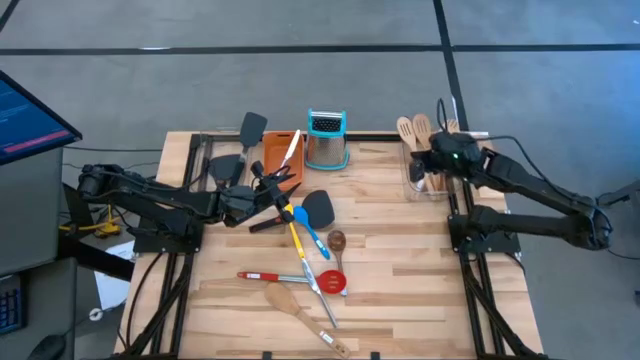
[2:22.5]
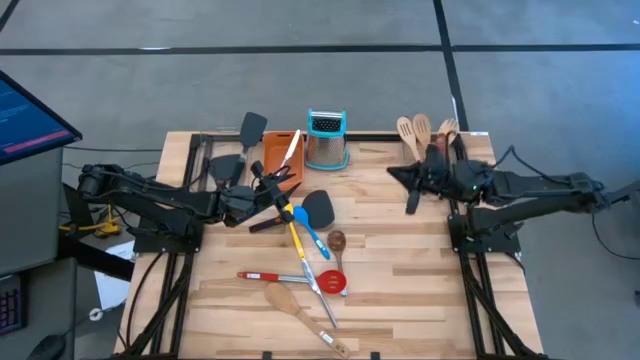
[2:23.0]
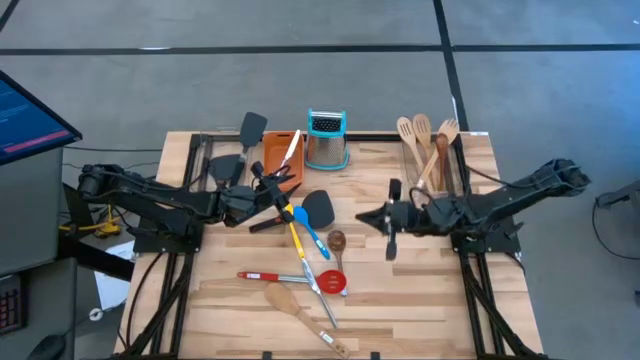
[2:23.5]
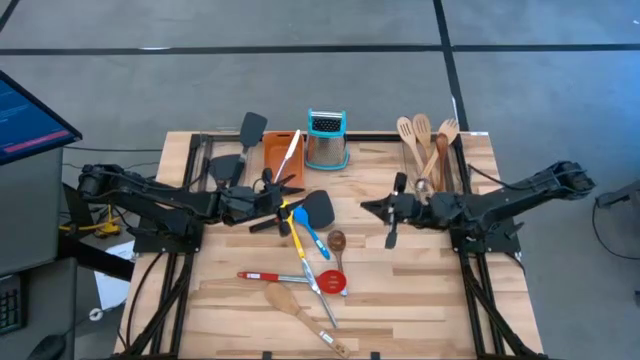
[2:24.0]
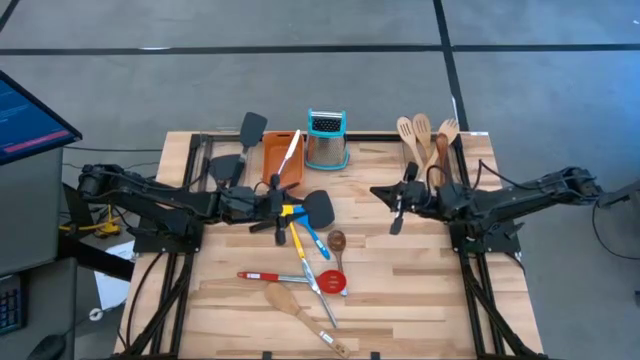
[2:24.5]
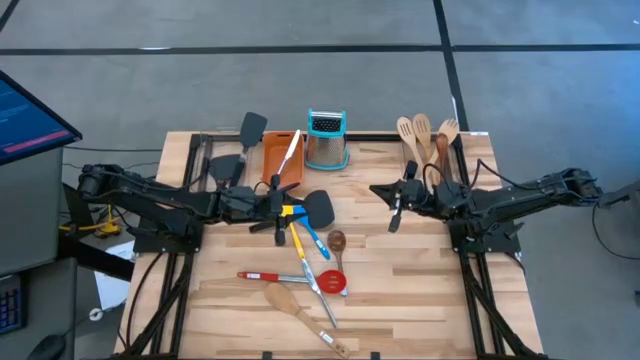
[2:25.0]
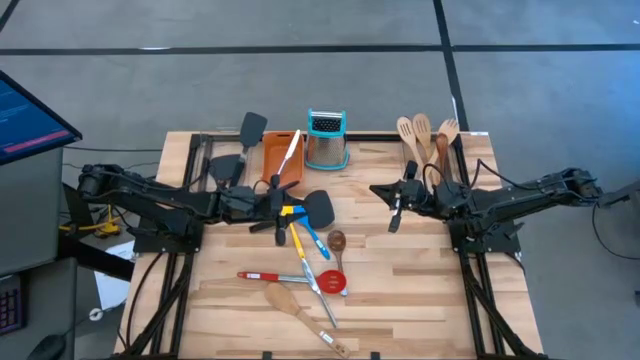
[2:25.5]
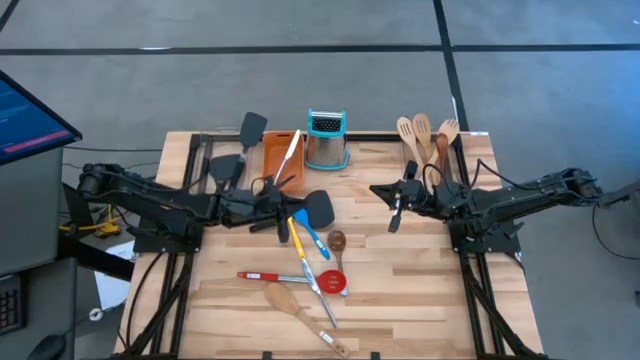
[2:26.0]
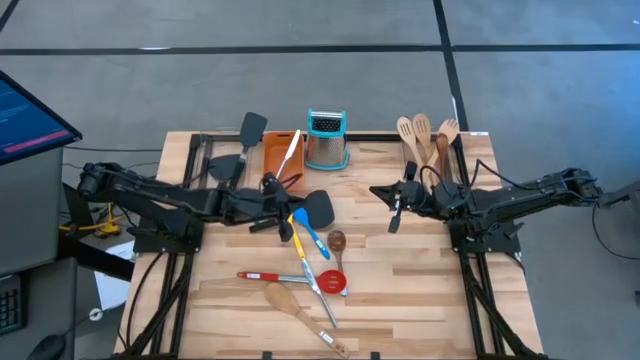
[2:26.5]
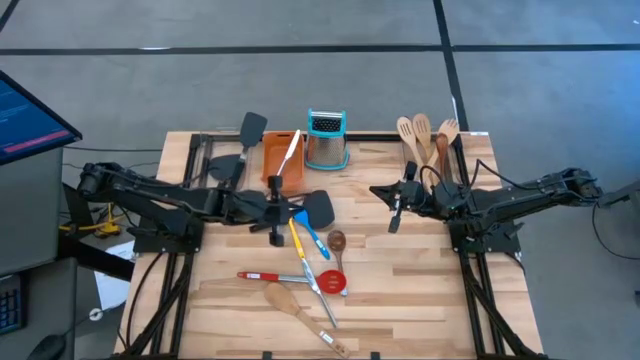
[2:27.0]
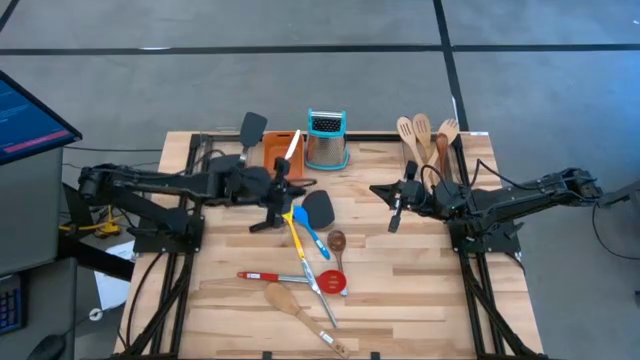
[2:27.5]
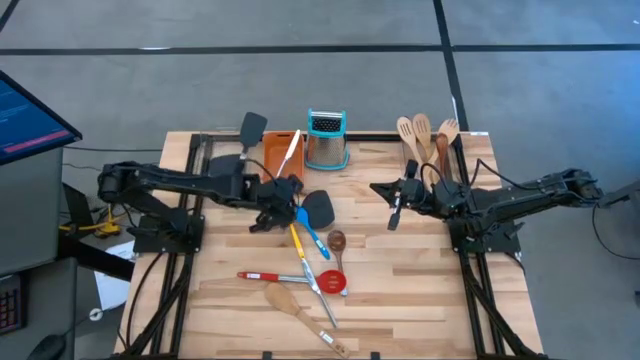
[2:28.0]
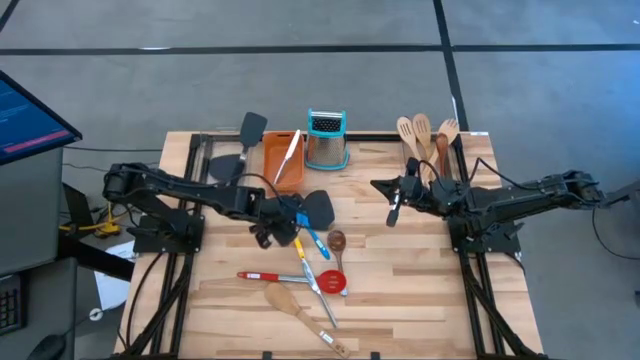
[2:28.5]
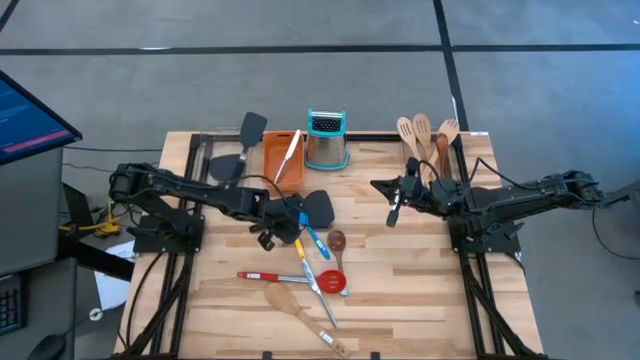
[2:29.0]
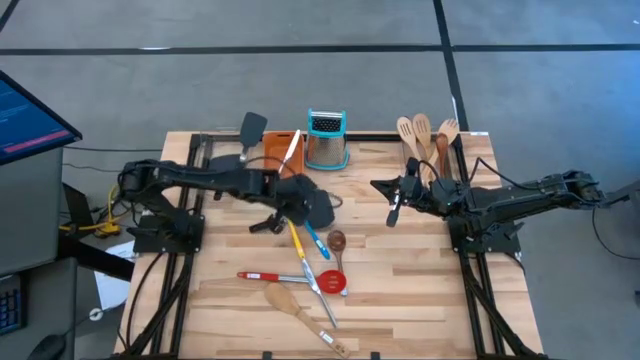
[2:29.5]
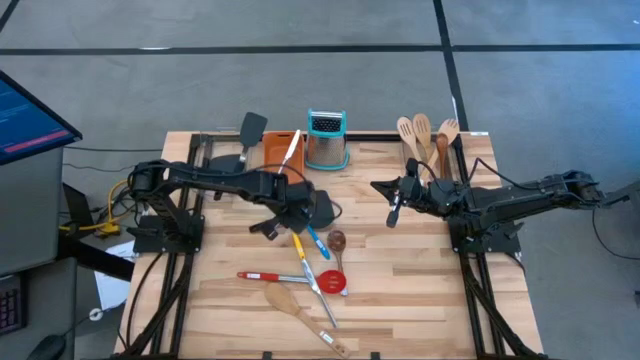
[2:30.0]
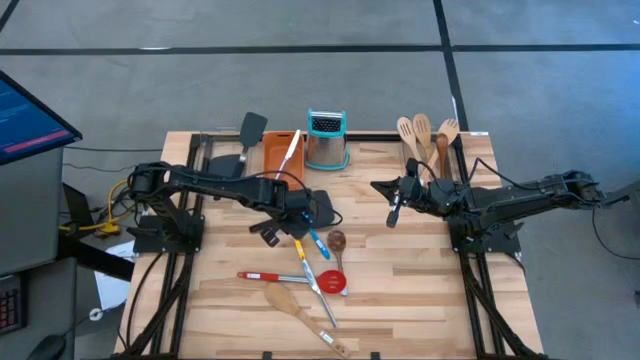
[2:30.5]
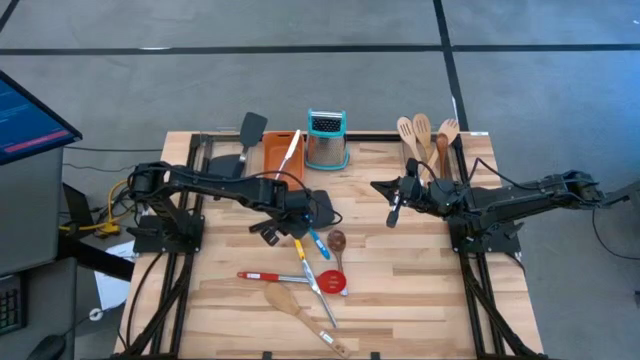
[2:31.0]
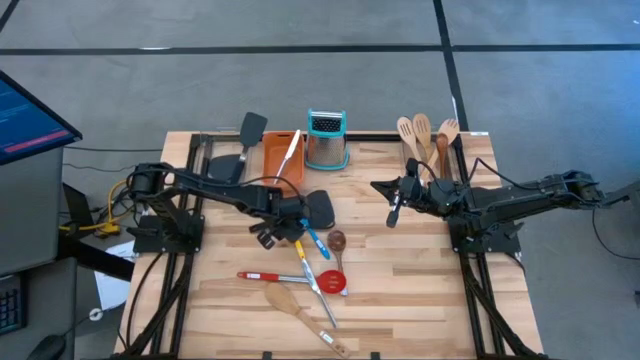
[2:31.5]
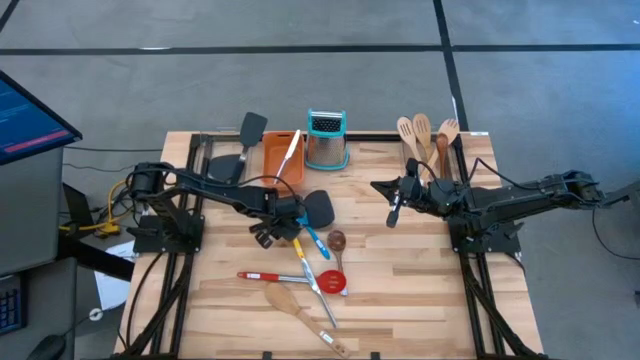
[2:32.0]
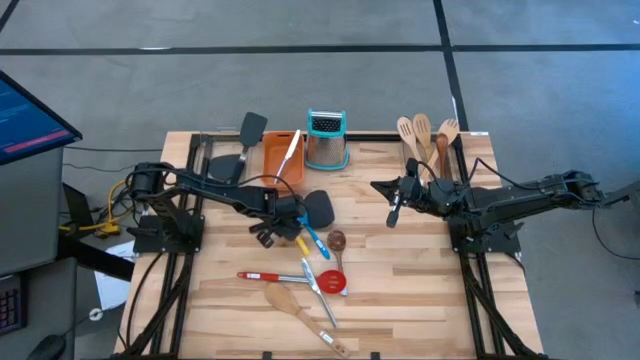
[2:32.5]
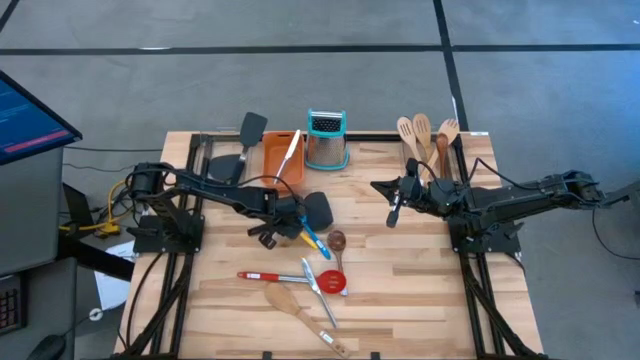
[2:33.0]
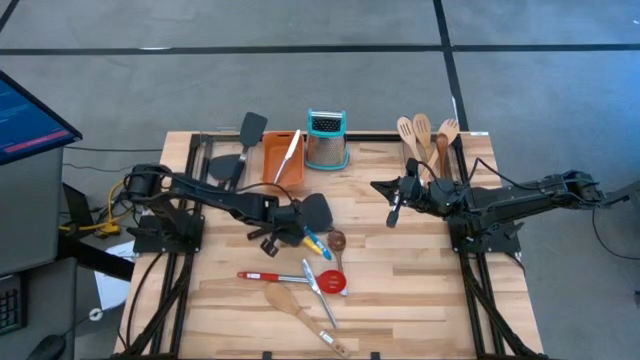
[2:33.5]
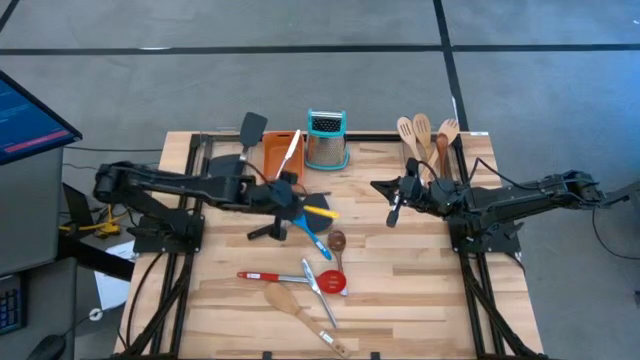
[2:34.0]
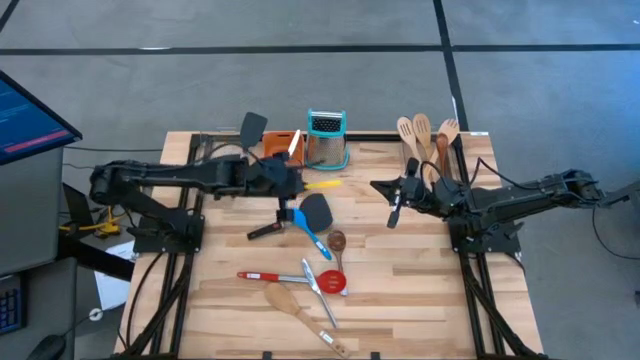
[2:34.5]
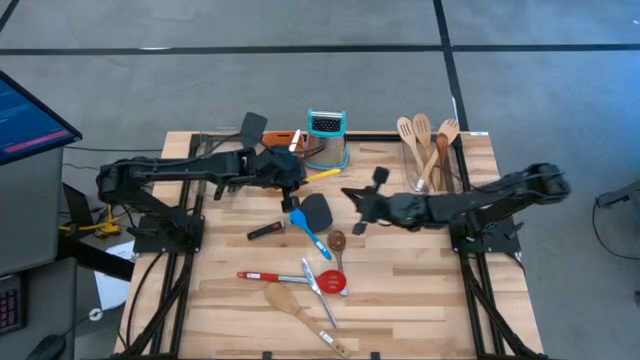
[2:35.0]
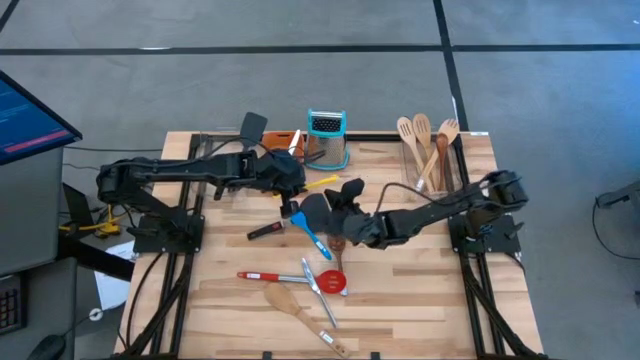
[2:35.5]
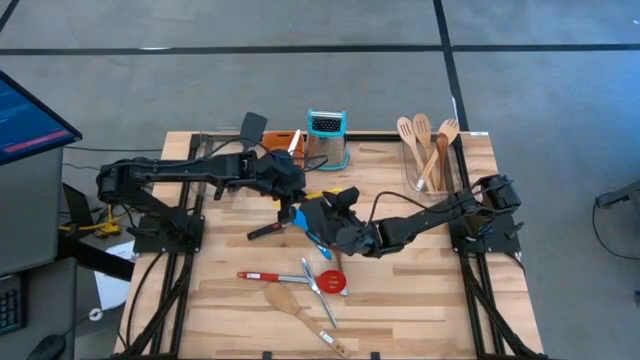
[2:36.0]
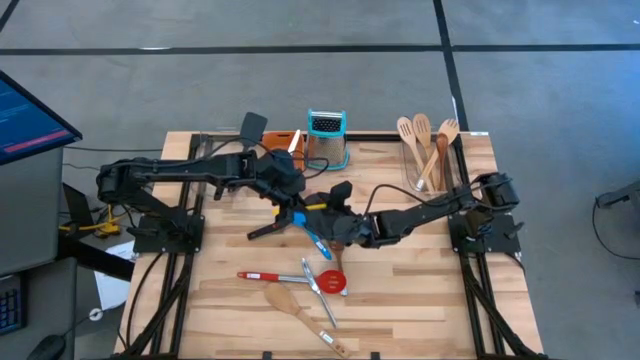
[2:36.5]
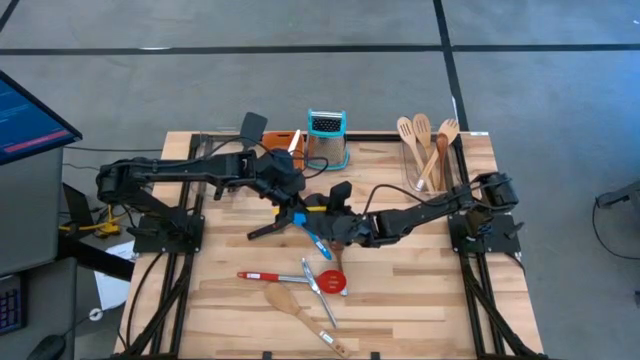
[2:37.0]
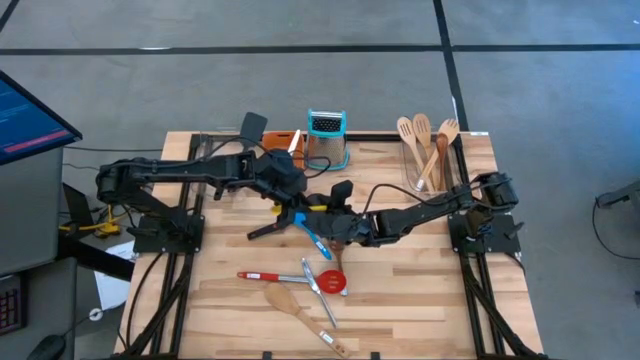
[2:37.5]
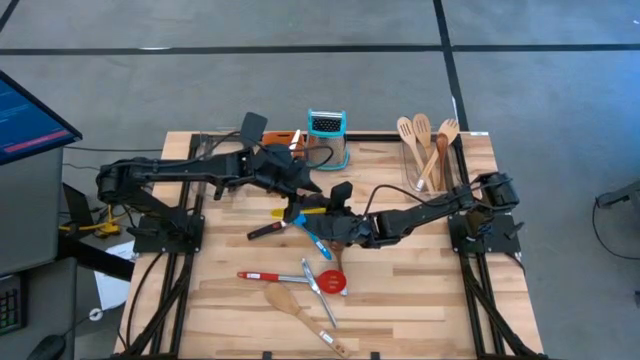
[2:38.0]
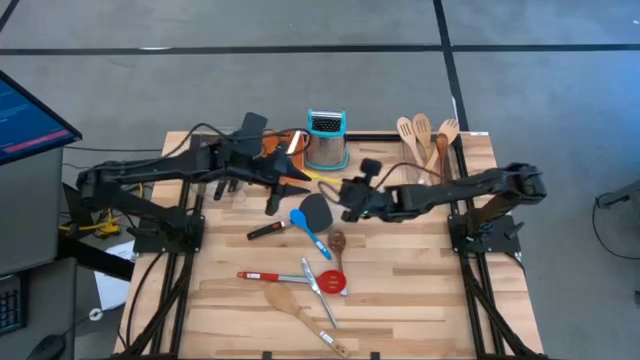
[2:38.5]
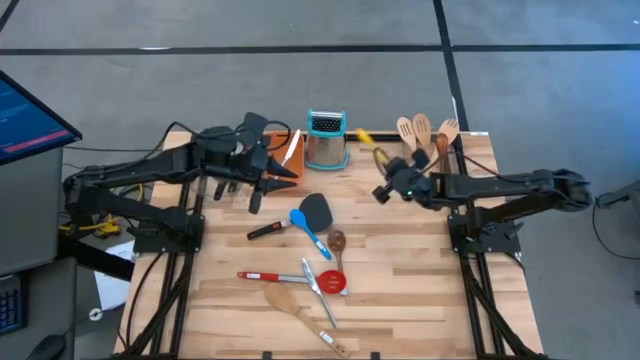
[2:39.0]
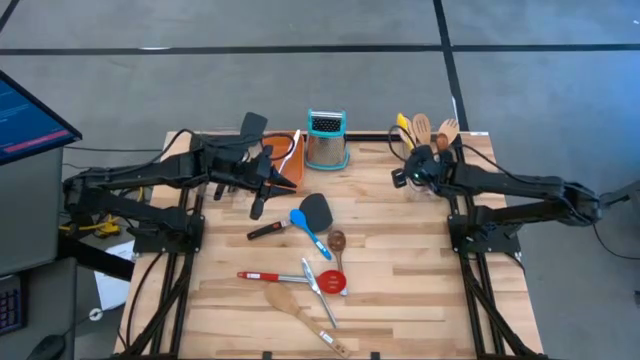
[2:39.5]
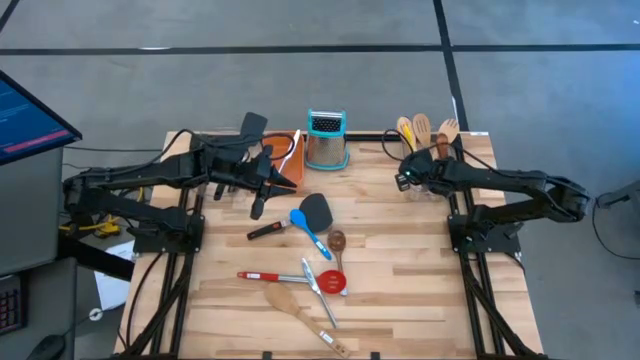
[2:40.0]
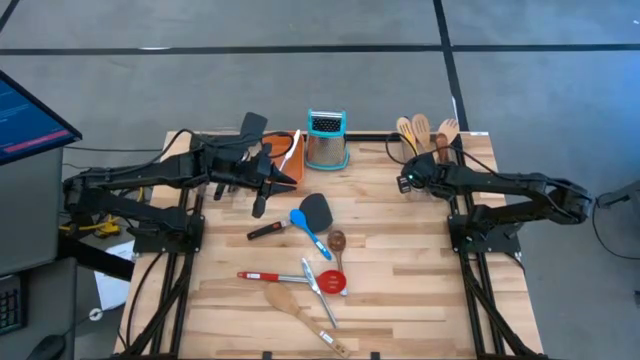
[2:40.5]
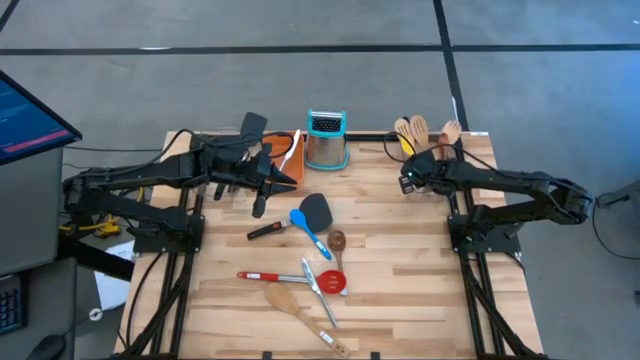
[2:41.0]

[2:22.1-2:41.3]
Task: Pick & Place Kitchen Items
Put the yellow spoon into the right transparent bin

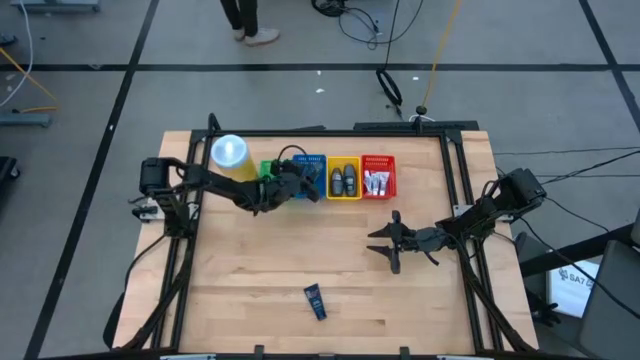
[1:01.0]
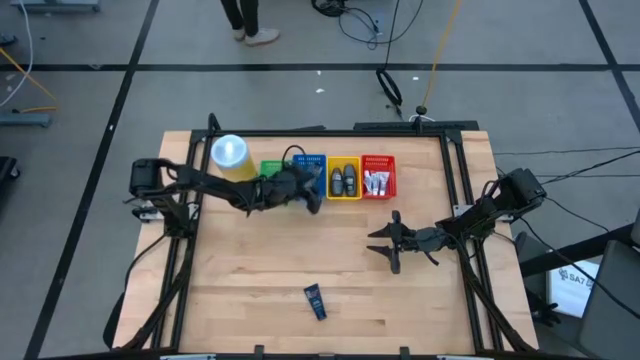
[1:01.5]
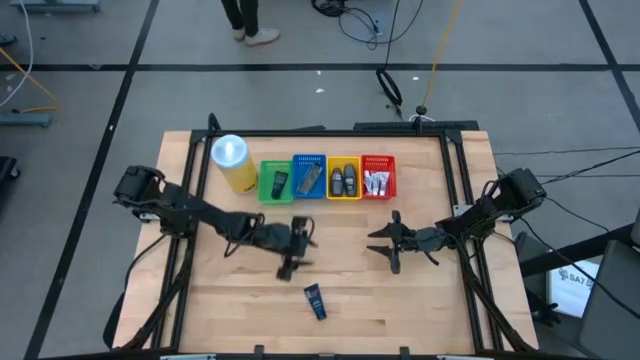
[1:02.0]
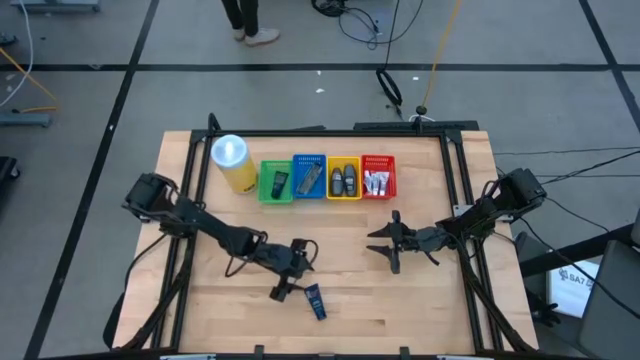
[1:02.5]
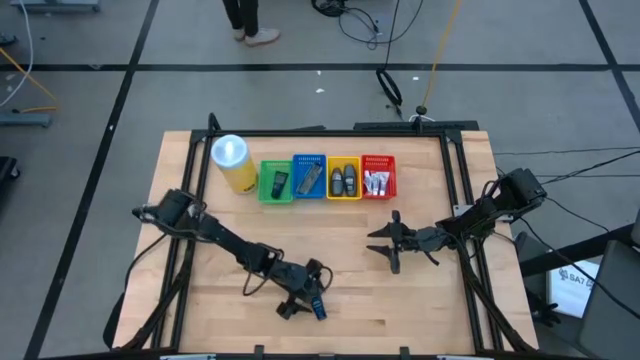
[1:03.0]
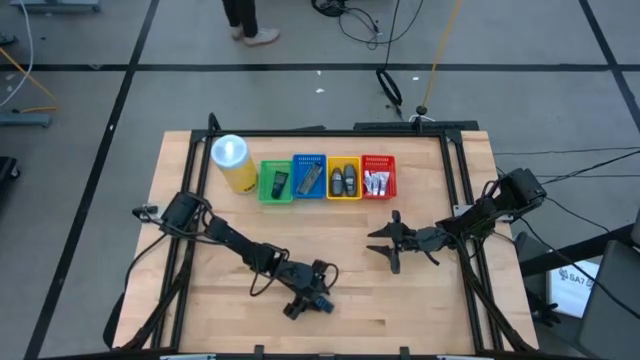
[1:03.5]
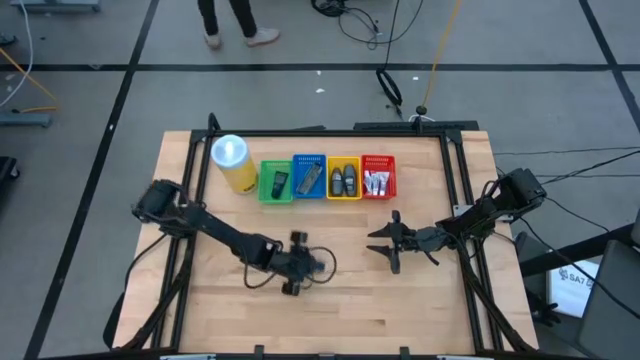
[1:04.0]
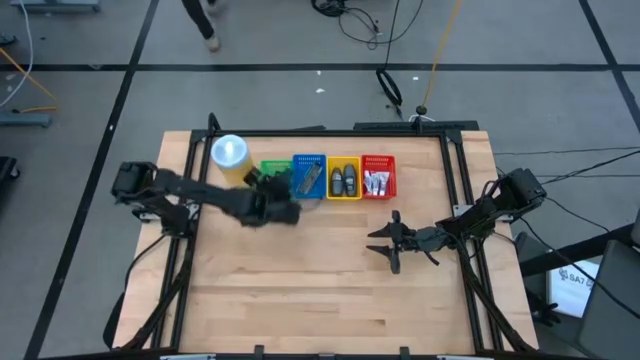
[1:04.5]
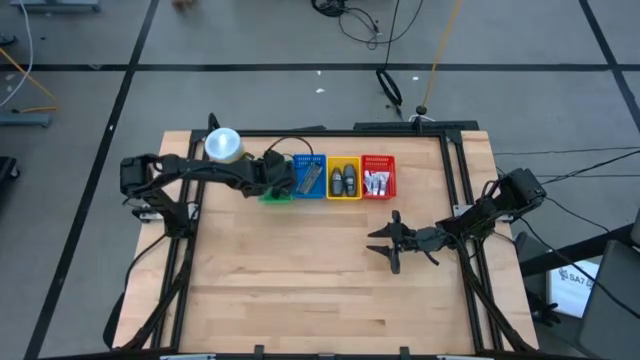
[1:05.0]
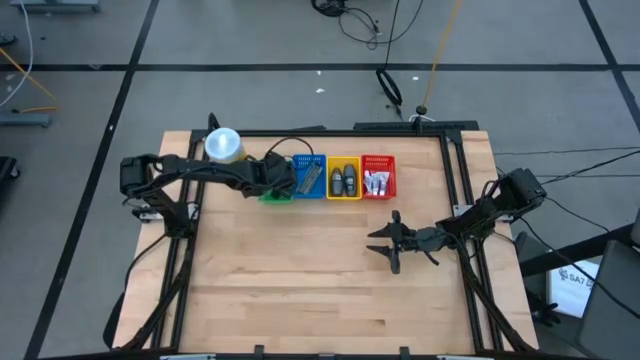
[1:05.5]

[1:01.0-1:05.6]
Task: Pick & Place Travel size toiletries
Put the shave cream into the green basket
